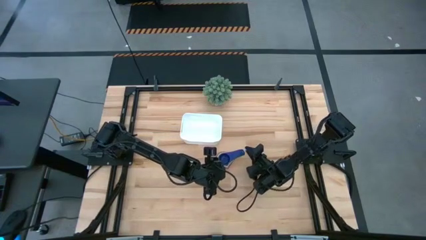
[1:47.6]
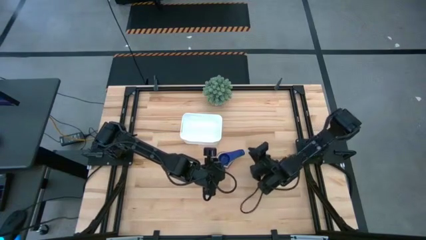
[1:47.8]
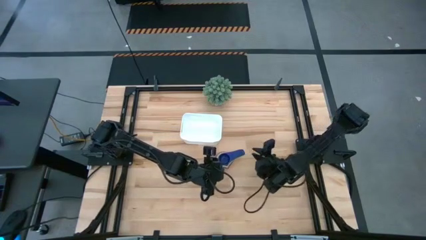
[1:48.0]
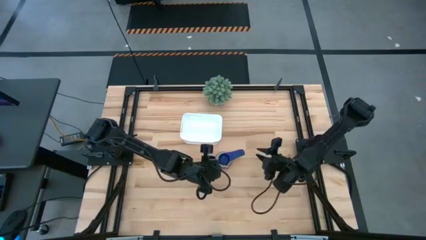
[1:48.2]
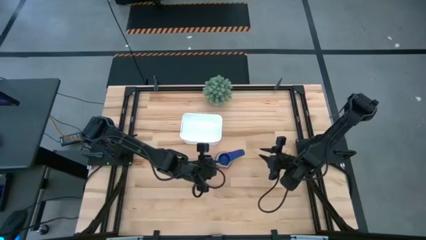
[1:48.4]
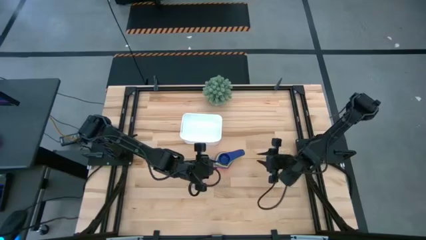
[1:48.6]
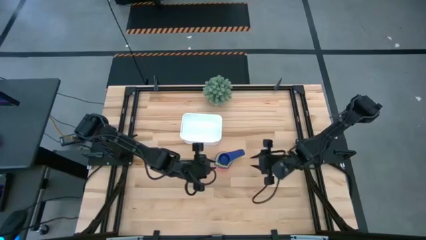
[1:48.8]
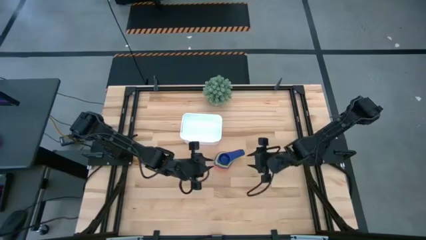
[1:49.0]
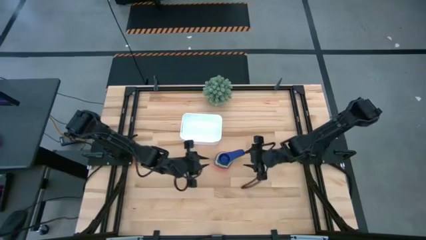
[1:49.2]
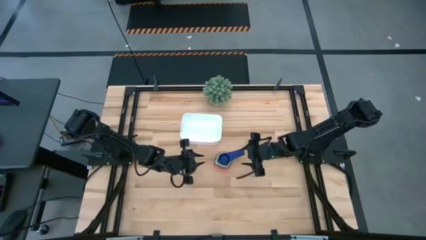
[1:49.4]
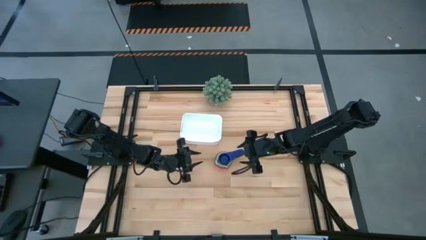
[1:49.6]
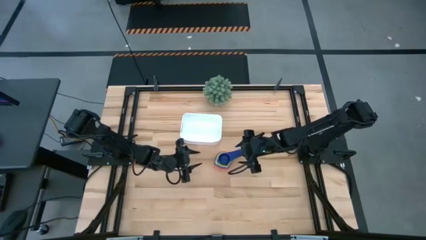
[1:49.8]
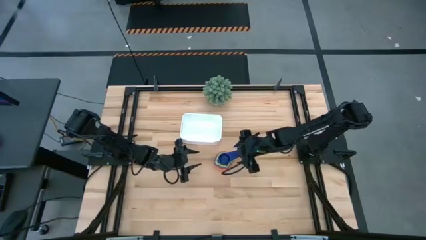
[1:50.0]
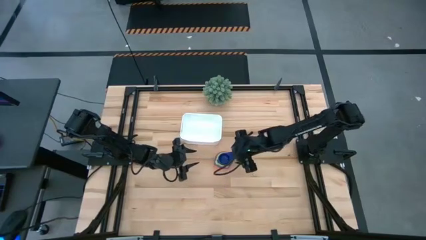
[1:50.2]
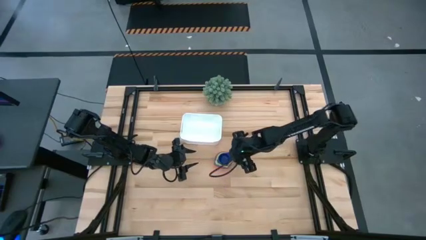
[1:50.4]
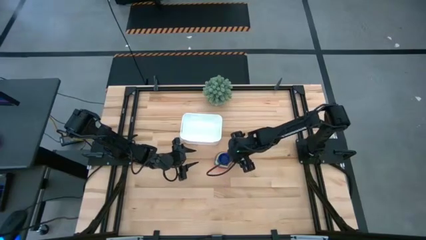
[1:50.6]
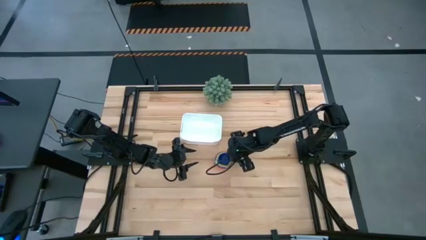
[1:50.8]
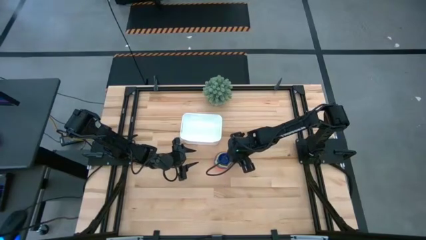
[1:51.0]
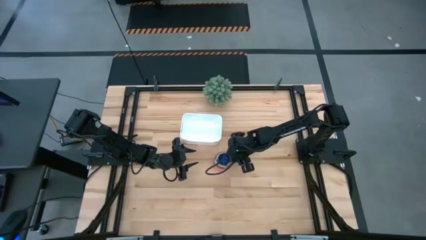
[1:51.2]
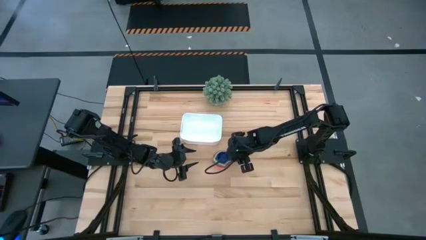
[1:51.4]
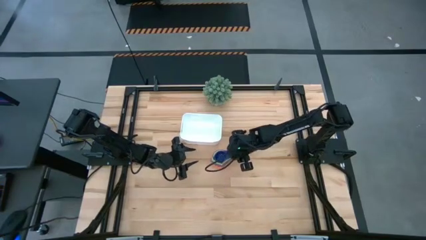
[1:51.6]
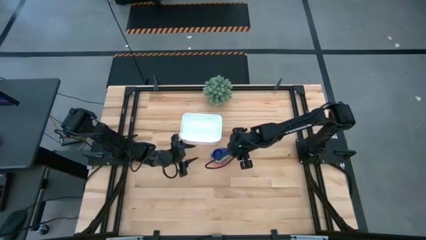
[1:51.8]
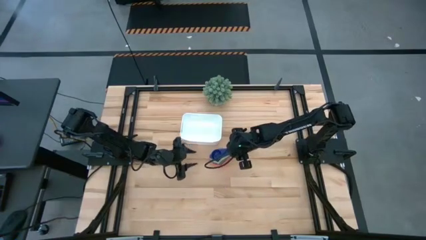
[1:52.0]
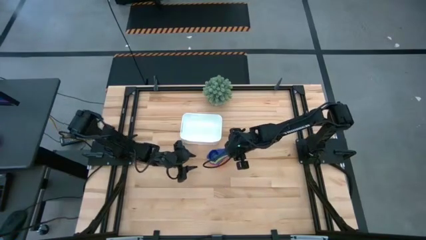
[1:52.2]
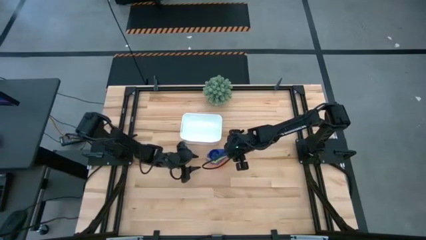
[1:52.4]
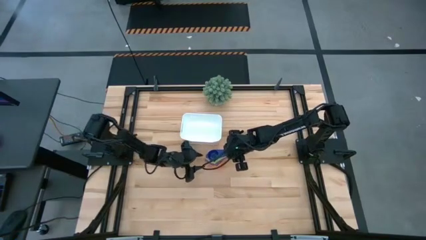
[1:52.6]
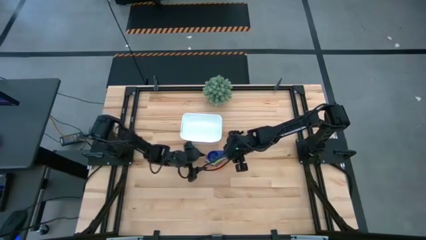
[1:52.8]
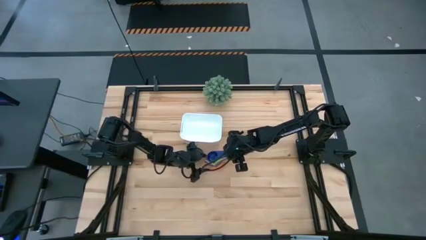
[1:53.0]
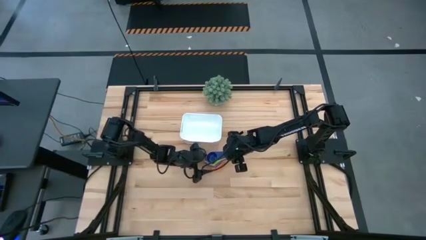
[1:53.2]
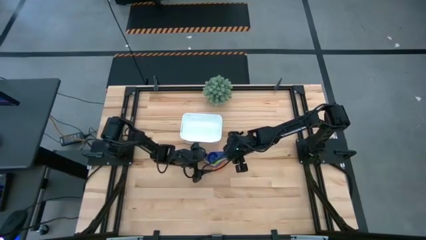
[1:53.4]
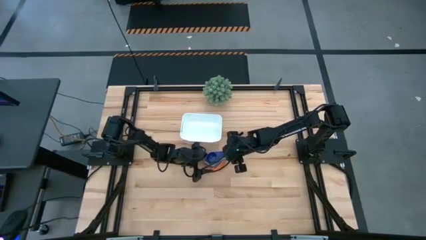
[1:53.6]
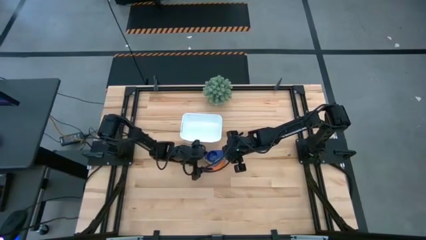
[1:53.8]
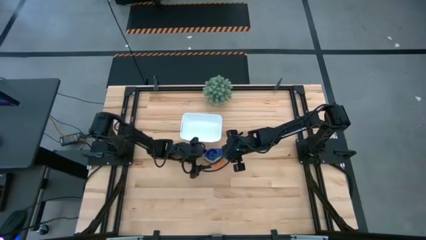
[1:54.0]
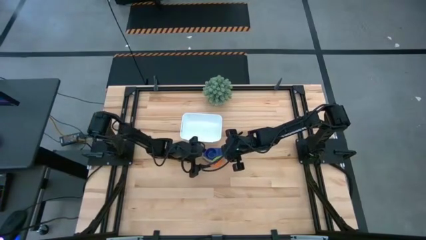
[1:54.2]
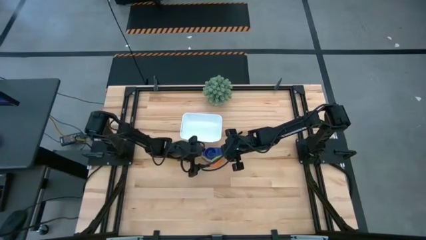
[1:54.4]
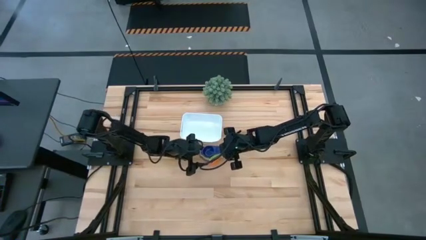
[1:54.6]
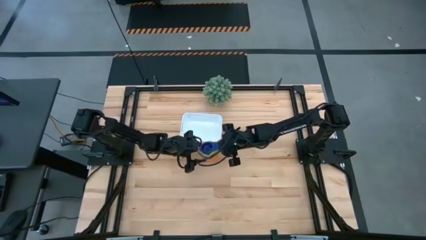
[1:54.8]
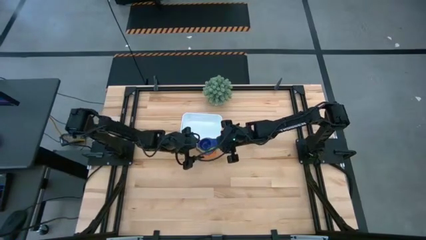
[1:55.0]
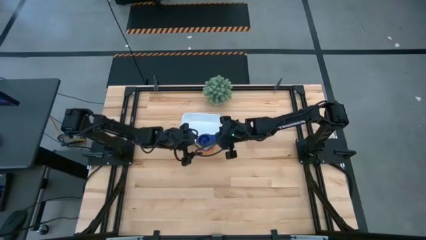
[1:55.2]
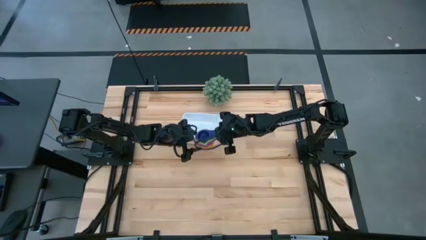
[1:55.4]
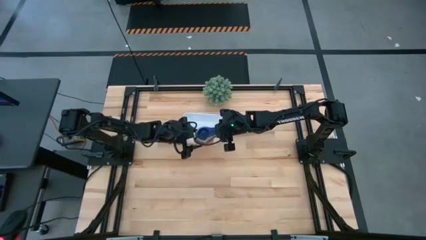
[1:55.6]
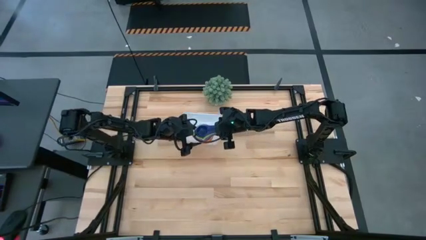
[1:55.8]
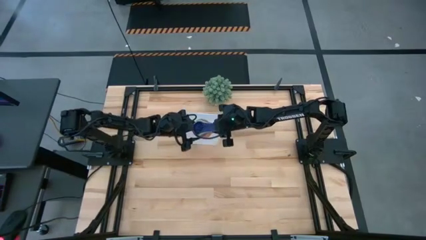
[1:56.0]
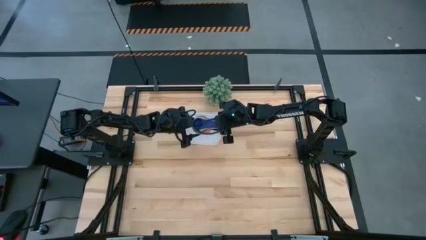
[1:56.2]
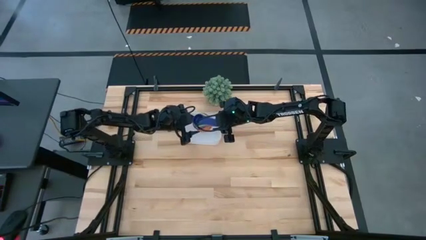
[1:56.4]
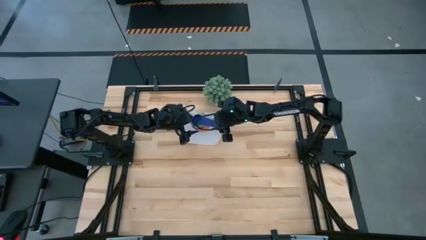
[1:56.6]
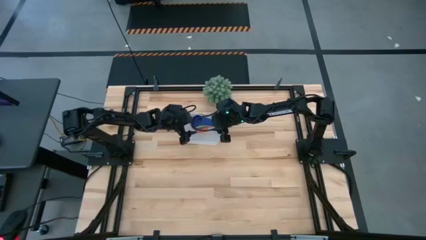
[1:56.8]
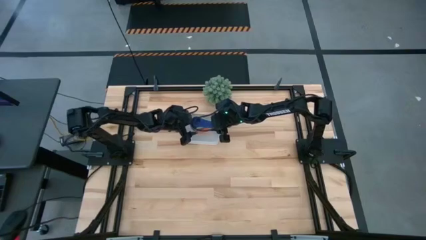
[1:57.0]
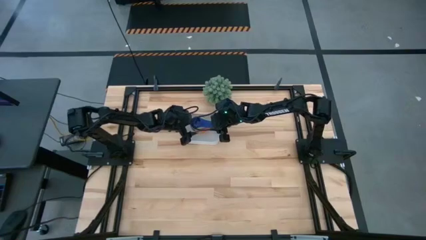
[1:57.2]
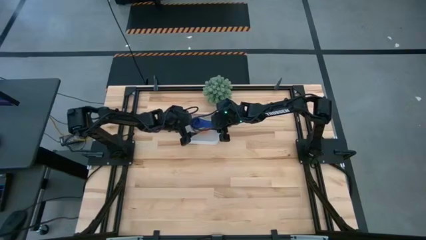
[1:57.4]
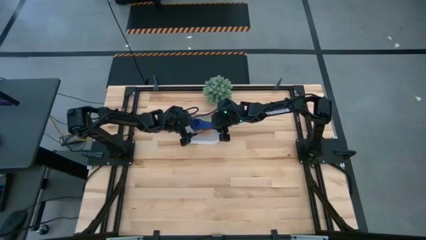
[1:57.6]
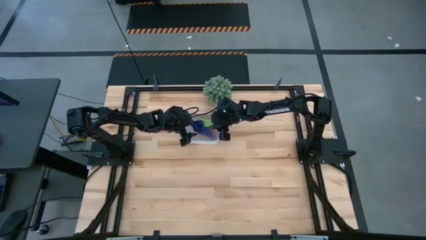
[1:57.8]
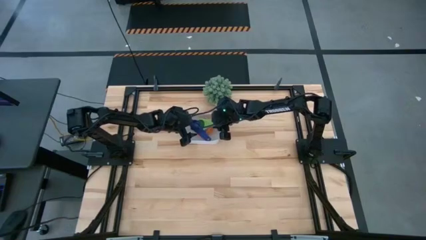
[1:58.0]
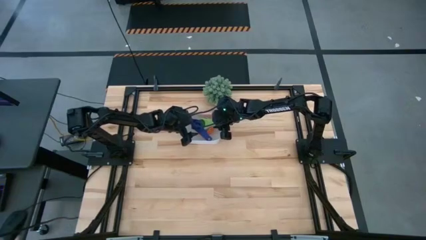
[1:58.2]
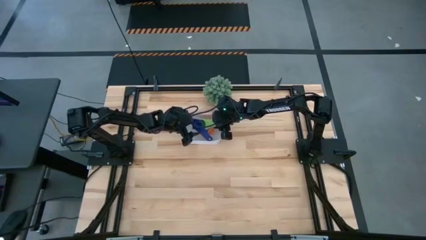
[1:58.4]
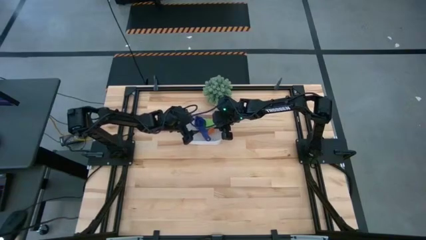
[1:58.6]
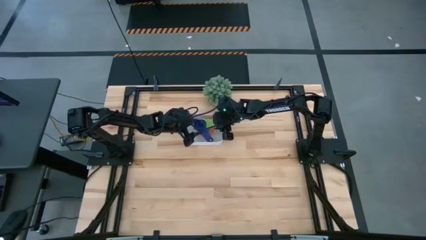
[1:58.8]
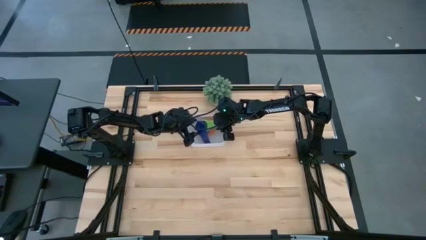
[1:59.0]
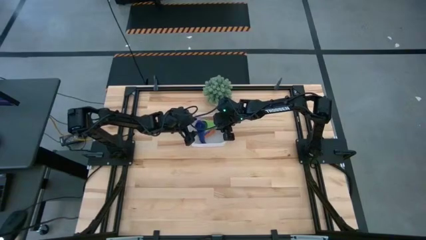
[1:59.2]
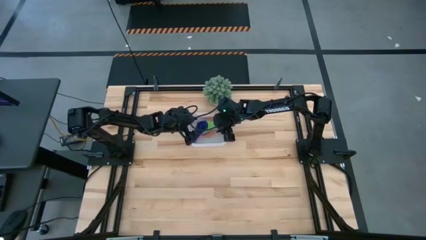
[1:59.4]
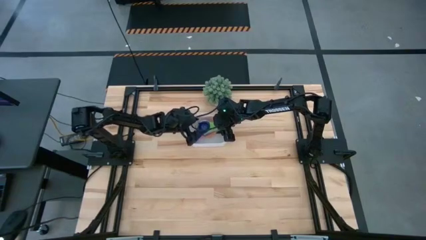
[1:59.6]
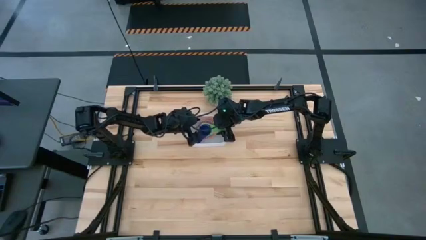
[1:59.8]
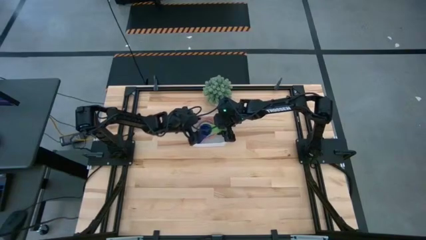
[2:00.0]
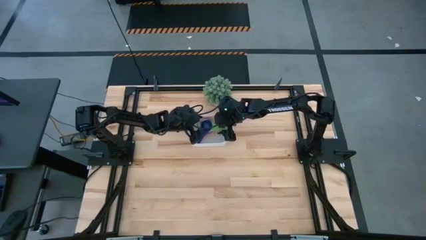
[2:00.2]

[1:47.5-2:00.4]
Task: Nest measuring cups in basket
Put the stacked nesting cups in the bin

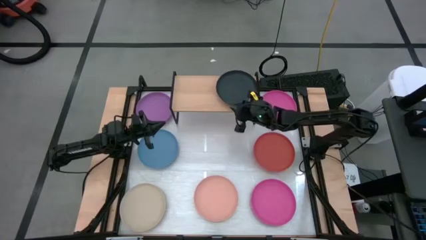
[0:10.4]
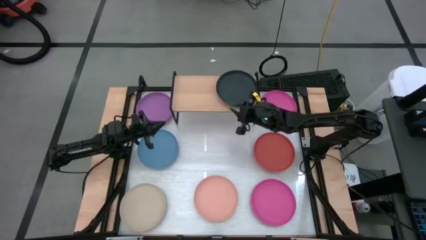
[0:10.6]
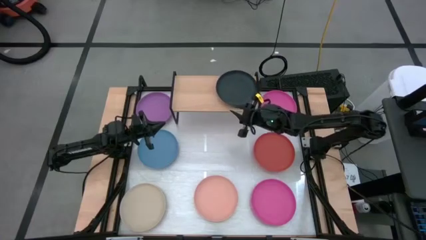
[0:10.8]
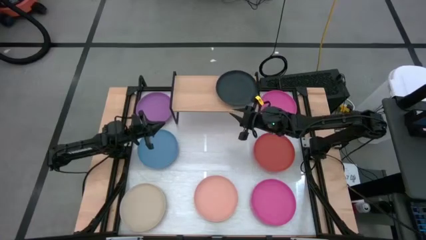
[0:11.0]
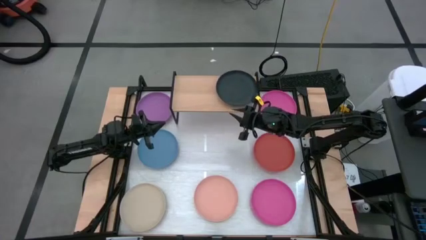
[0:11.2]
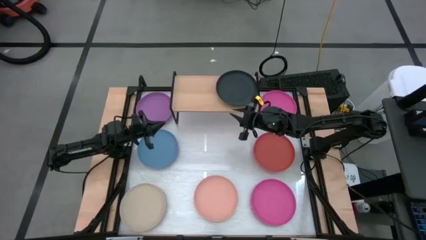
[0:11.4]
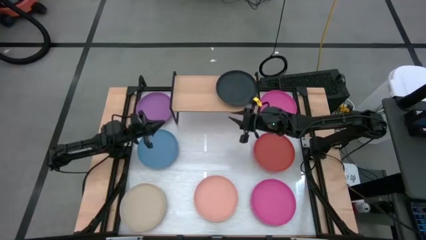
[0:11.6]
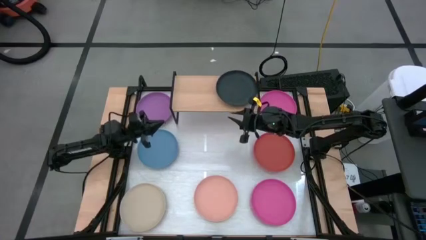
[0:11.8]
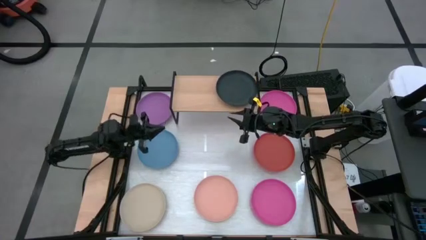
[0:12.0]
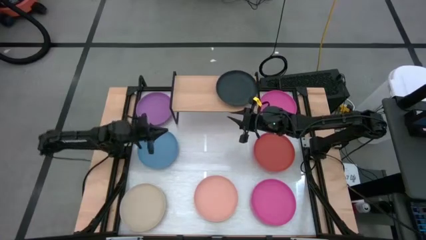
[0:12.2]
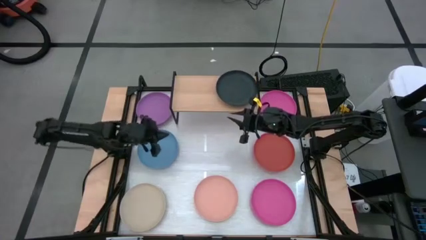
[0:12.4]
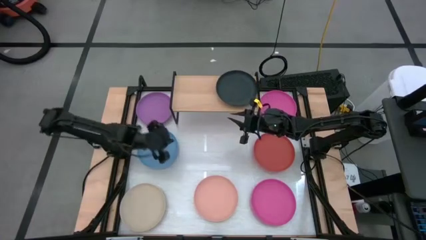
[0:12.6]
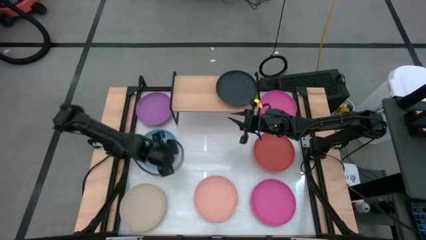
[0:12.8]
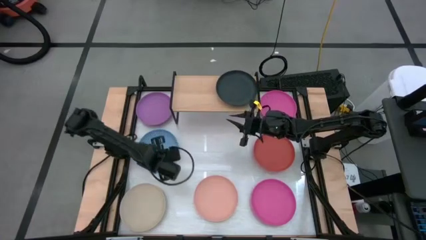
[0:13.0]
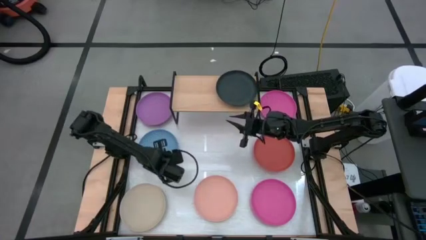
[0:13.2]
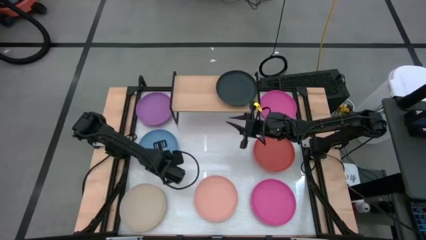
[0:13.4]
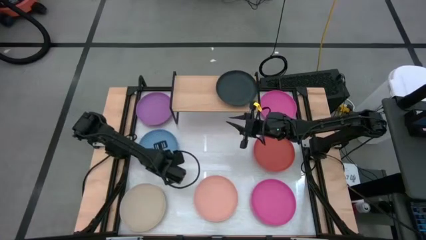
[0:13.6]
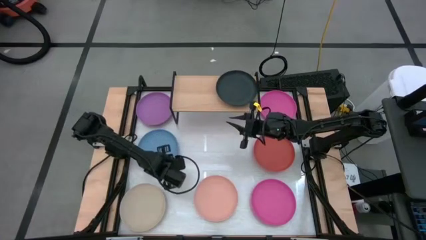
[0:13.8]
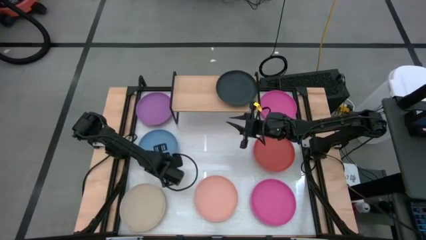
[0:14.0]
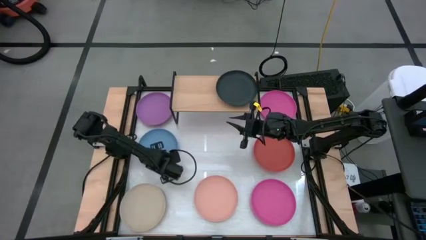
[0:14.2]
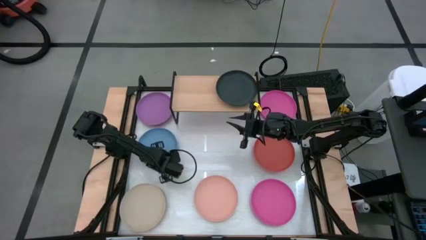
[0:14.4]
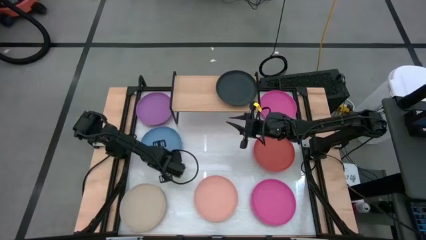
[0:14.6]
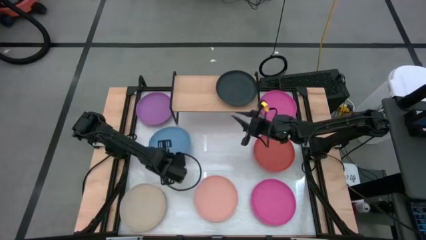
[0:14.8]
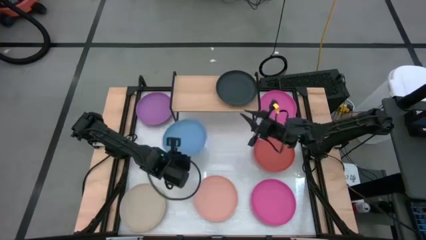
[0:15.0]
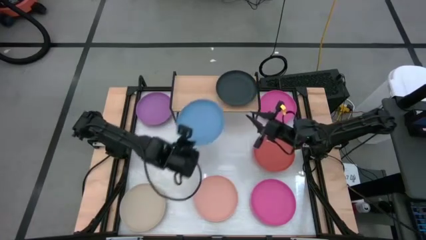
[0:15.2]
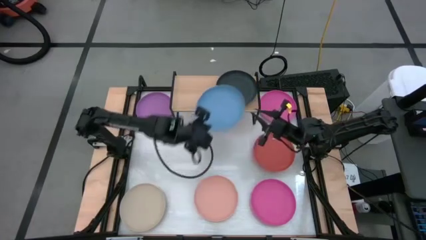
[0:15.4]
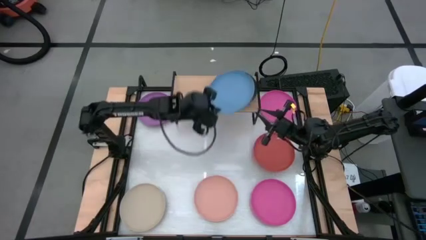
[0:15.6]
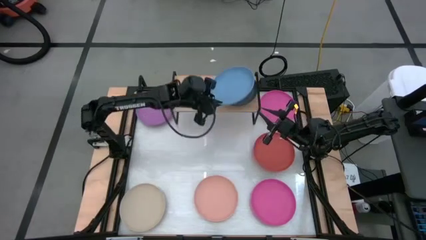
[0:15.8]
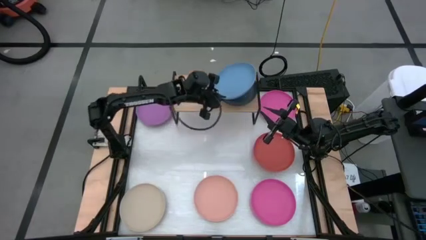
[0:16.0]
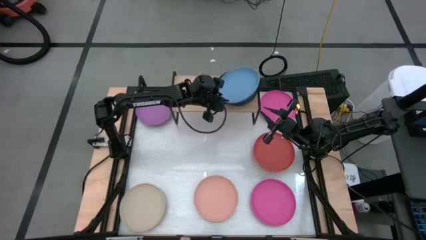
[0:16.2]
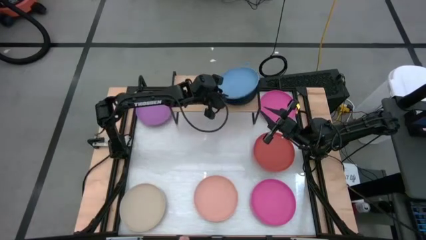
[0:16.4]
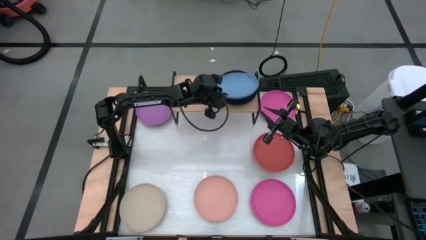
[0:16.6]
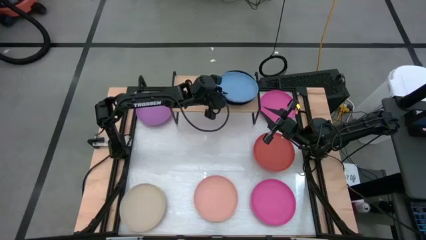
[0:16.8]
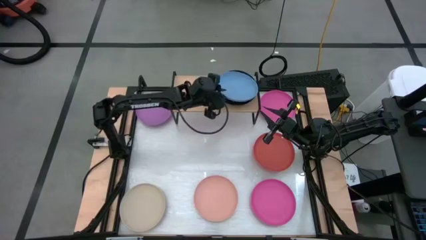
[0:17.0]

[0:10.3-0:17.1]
Task: Place and stack plates onto a shelf
Stack the blue plate on top of the black plate on the shelf
